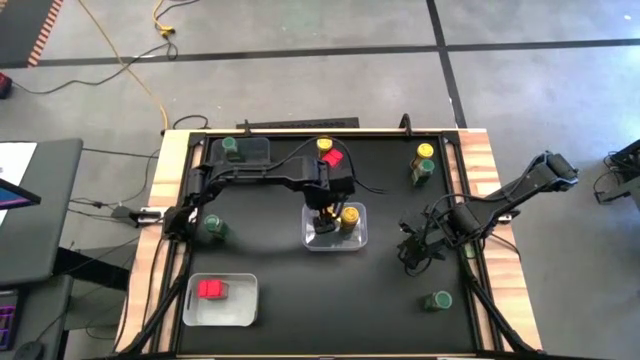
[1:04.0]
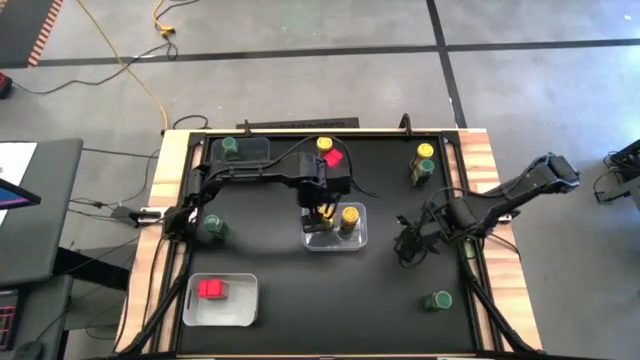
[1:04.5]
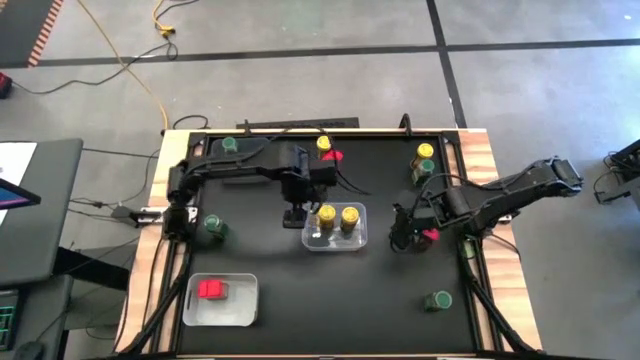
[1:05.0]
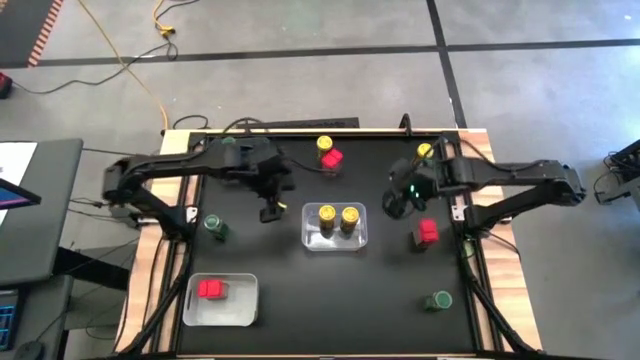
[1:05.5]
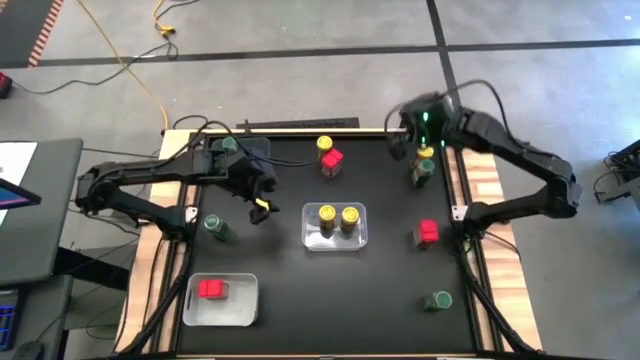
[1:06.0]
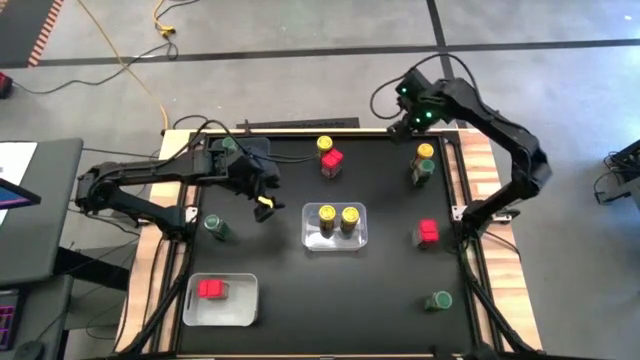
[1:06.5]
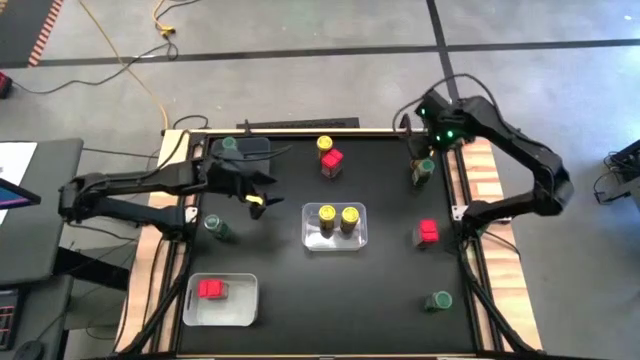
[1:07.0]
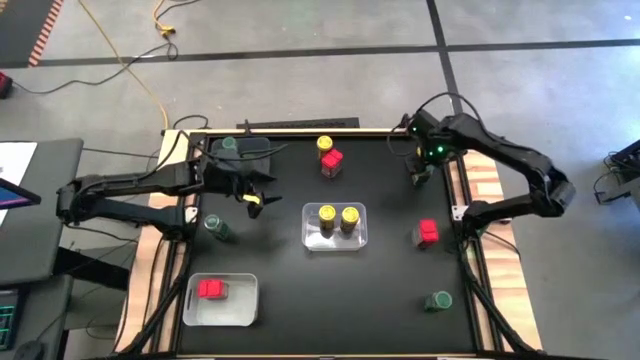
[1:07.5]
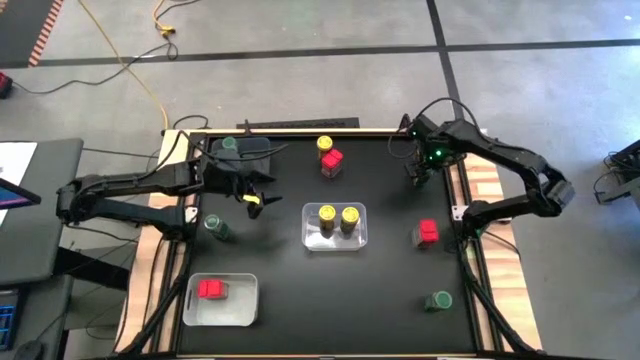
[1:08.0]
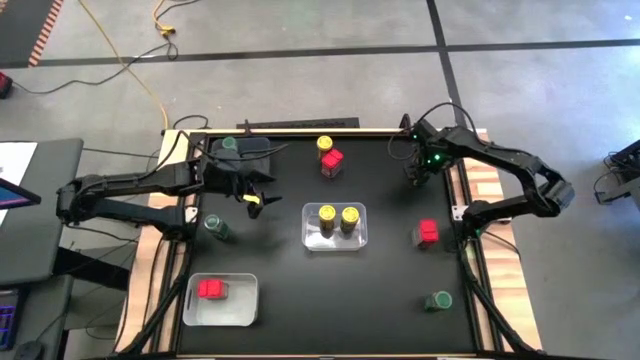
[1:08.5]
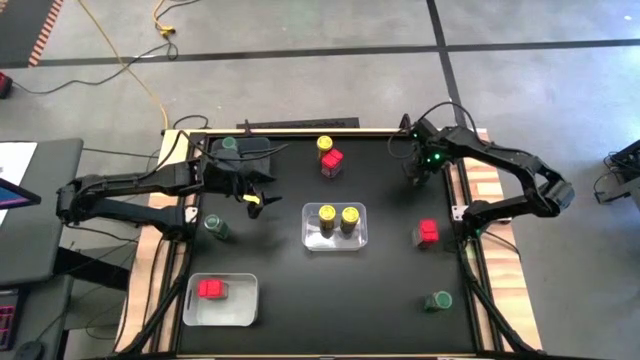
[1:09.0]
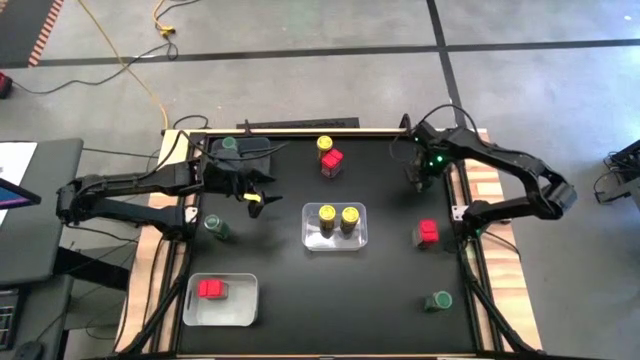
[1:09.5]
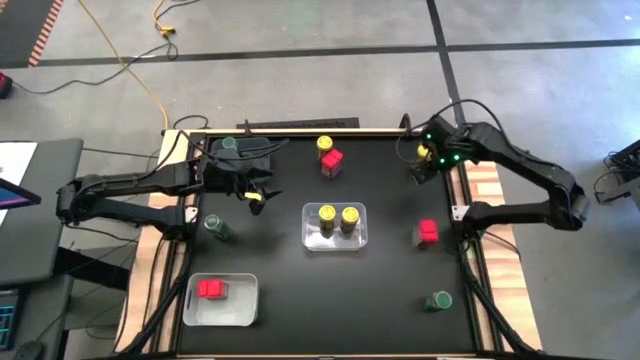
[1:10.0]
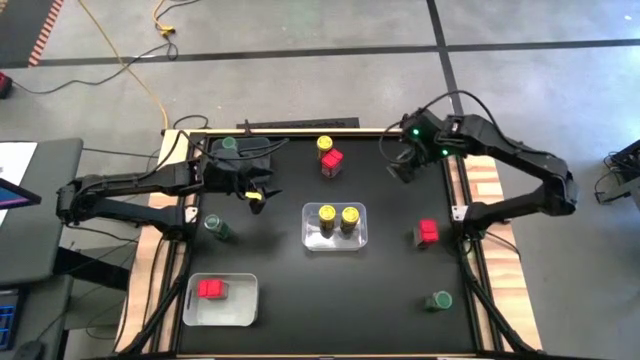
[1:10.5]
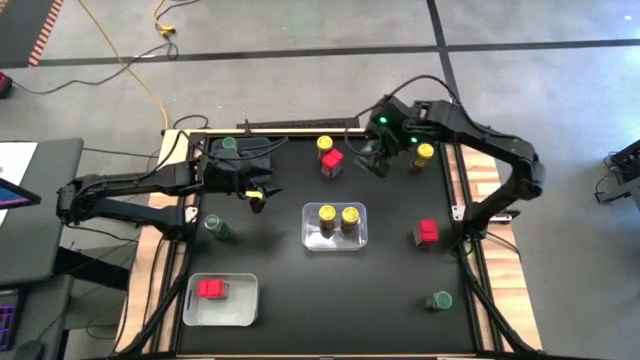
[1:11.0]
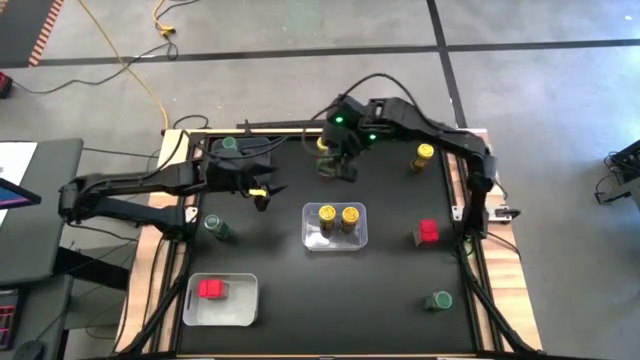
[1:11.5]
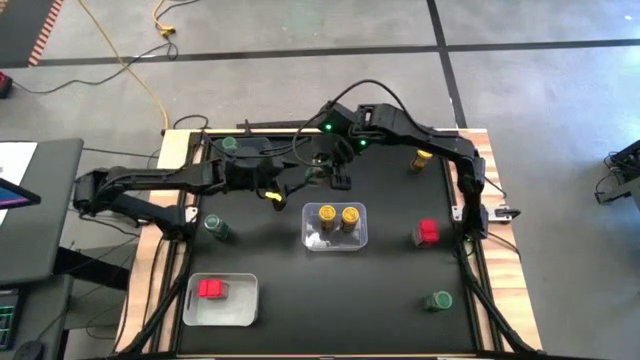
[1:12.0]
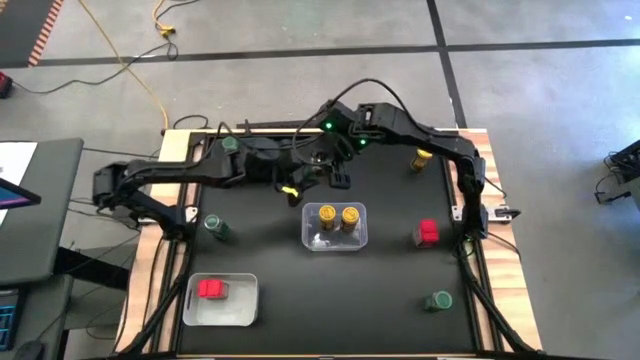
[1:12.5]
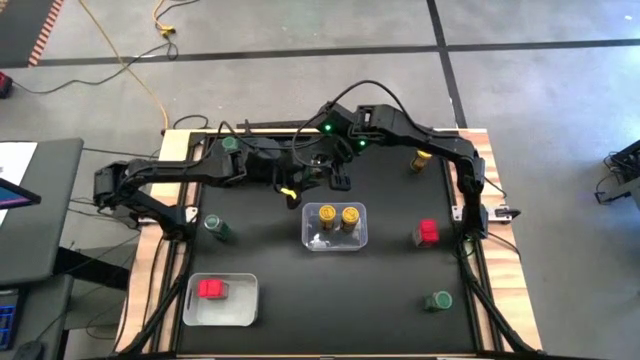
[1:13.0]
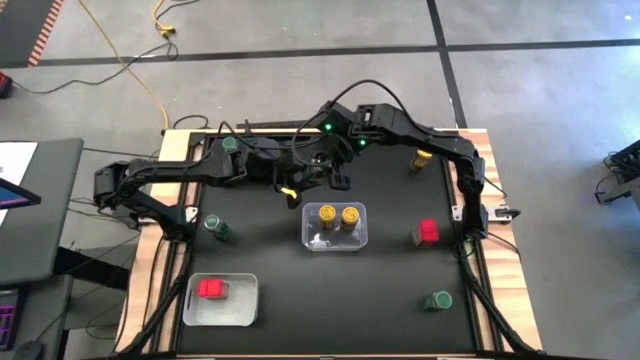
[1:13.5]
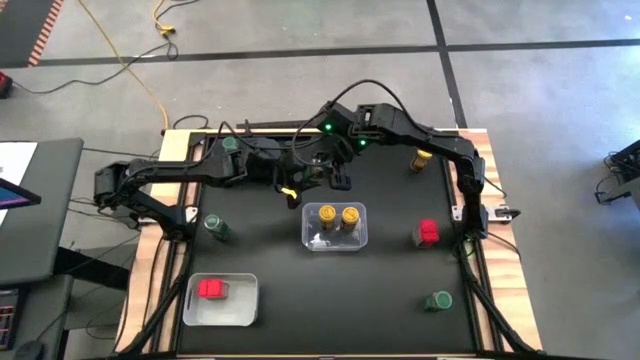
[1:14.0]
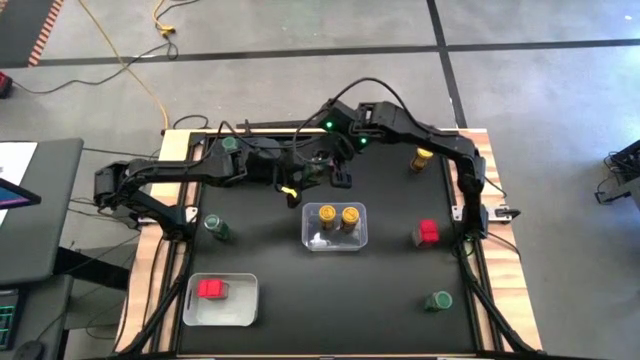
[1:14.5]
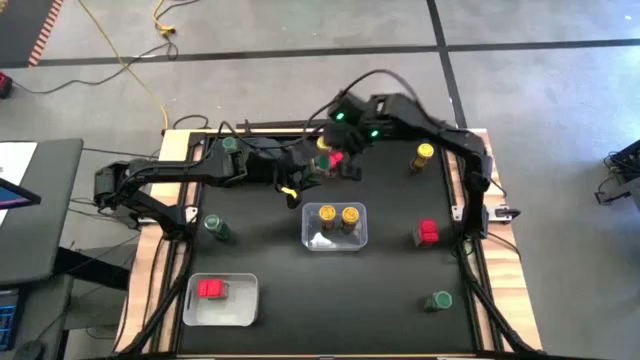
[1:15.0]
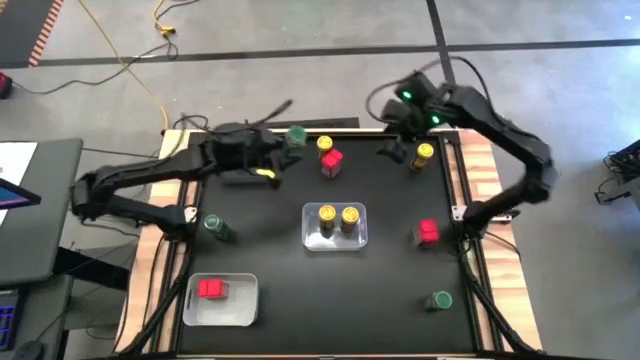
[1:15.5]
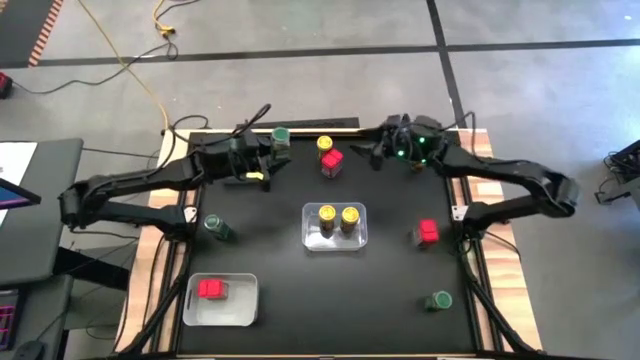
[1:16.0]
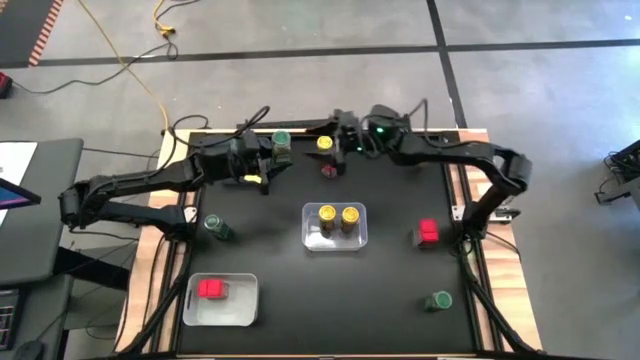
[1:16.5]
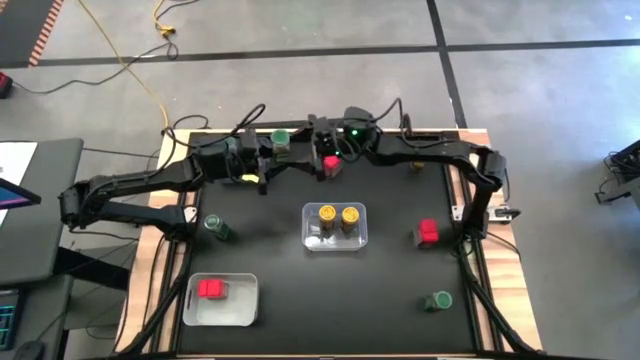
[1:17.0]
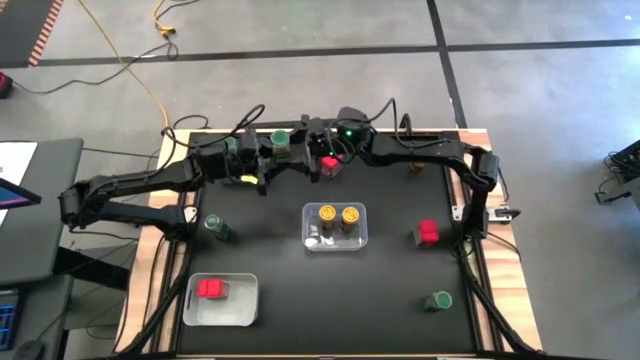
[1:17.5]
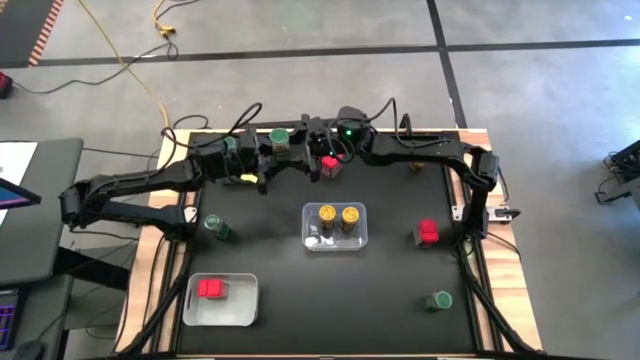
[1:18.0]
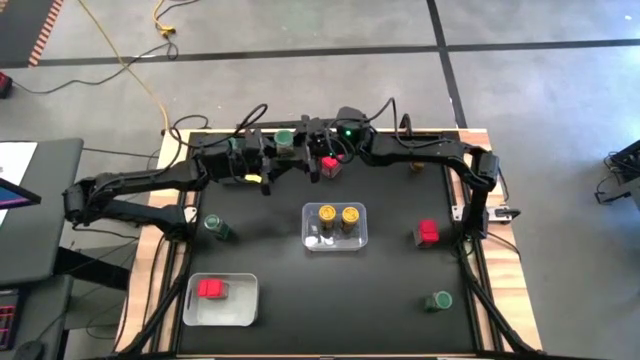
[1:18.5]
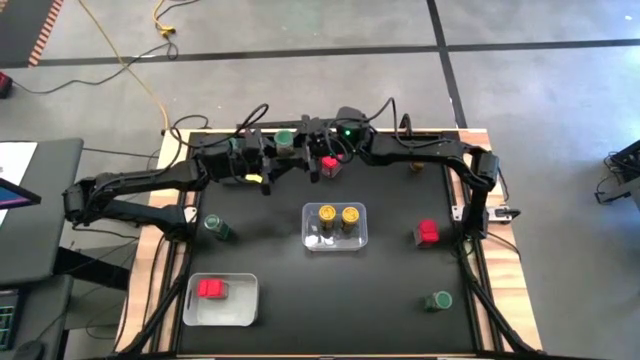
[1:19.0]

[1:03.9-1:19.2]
Task: Sort spices by type
Put the green seasoning bottle into the black bin

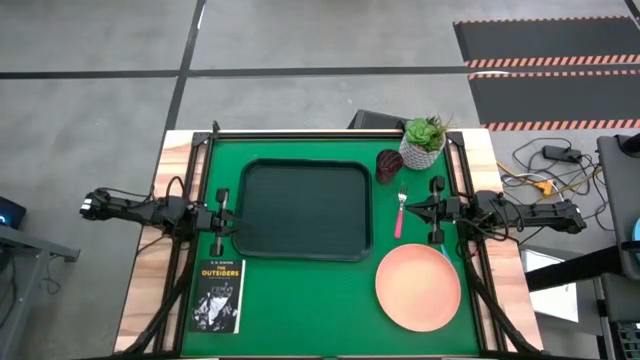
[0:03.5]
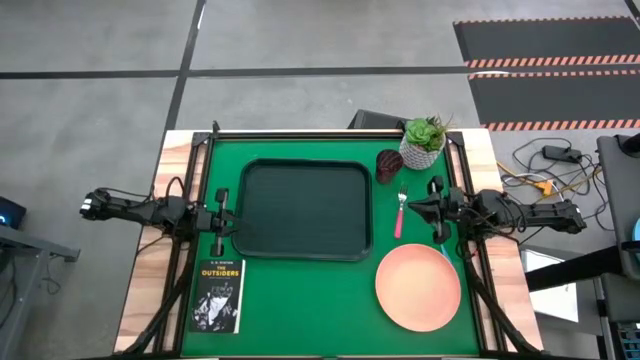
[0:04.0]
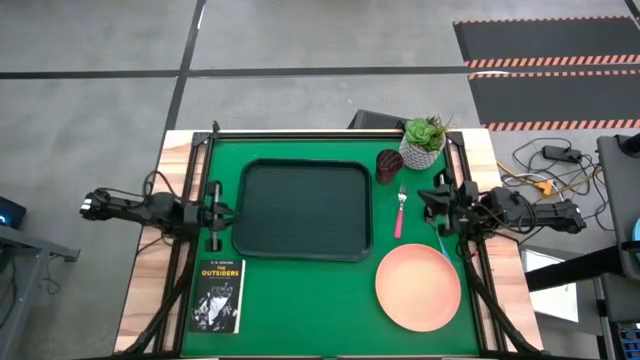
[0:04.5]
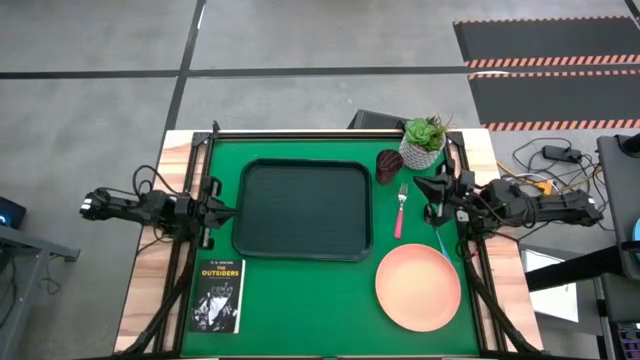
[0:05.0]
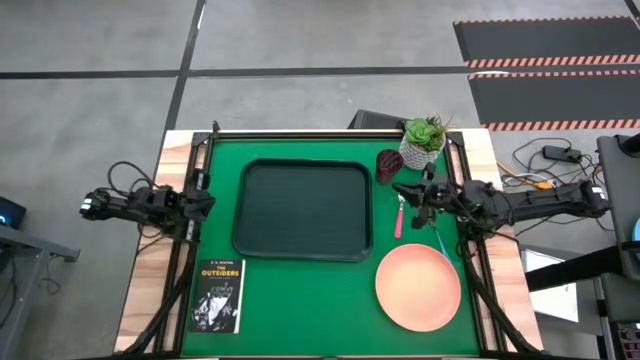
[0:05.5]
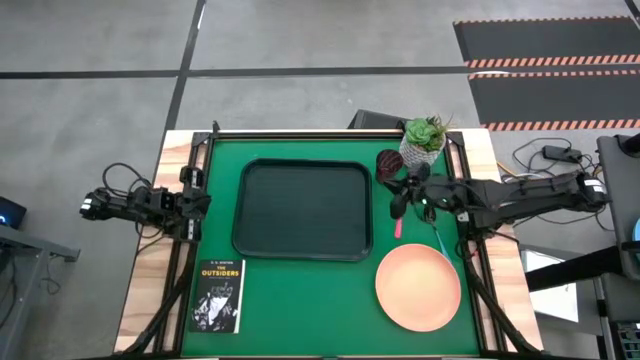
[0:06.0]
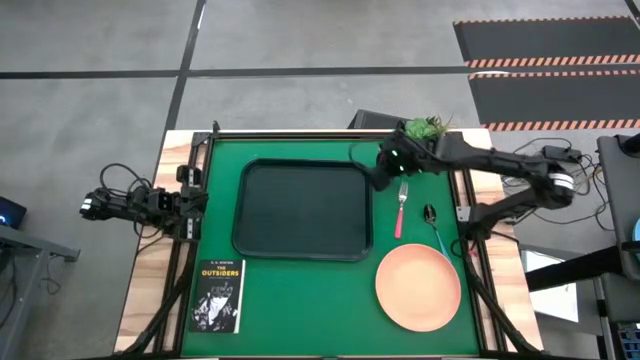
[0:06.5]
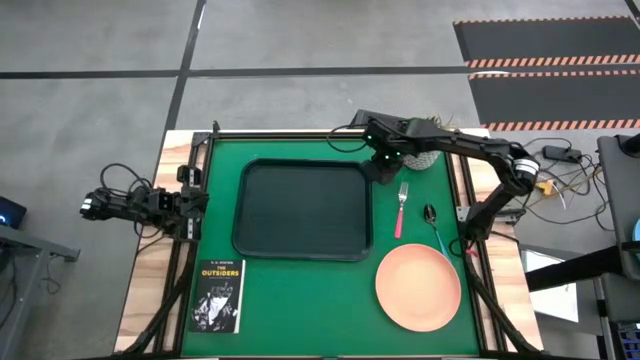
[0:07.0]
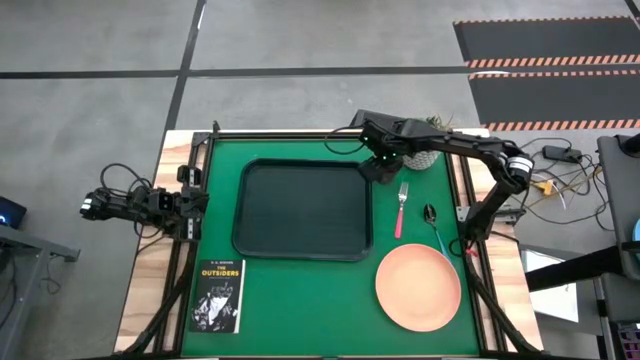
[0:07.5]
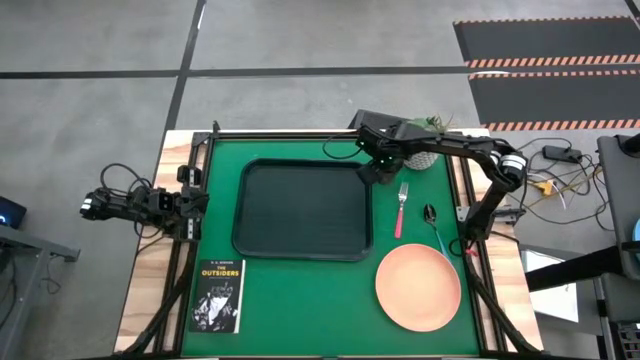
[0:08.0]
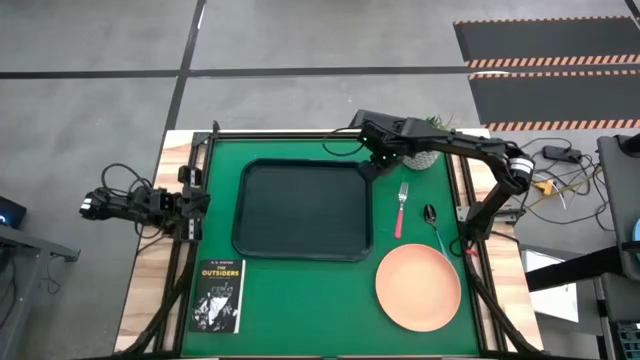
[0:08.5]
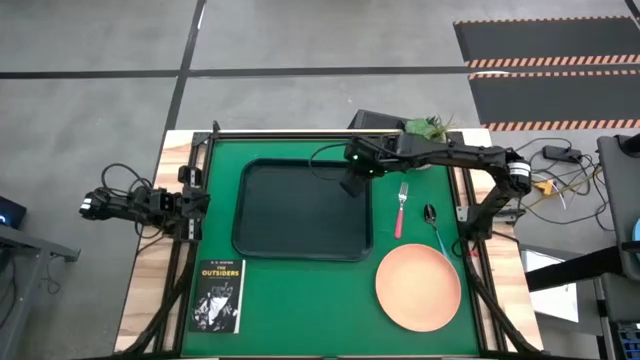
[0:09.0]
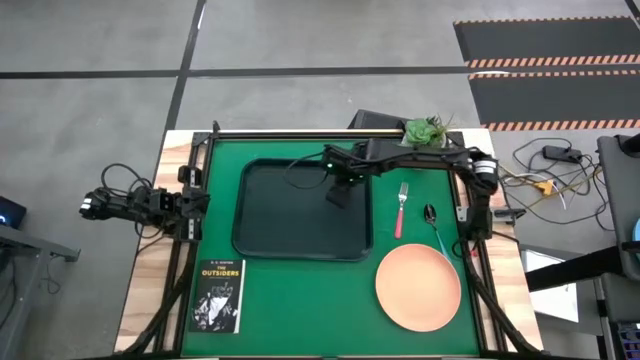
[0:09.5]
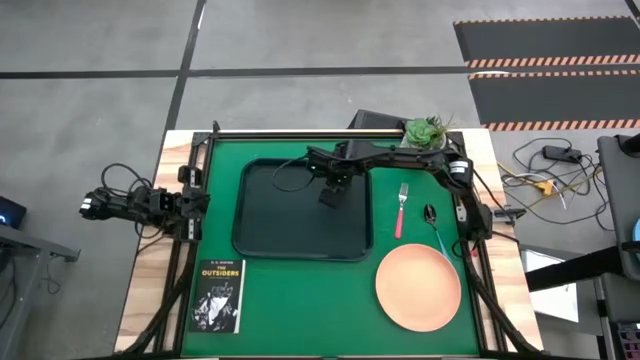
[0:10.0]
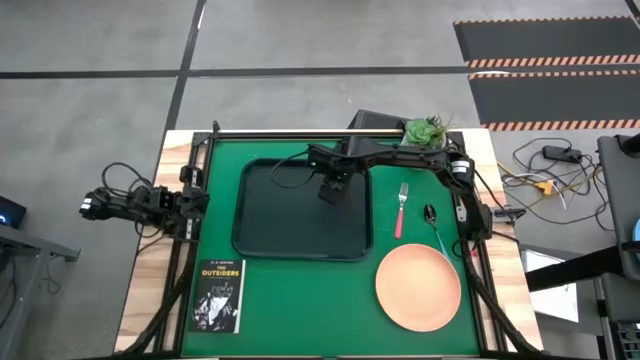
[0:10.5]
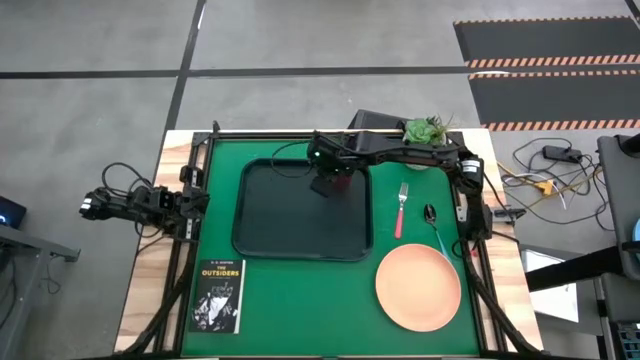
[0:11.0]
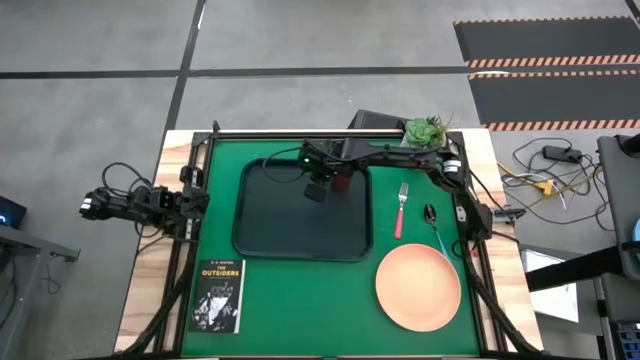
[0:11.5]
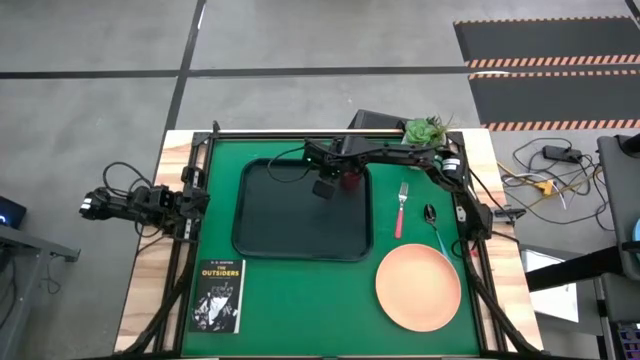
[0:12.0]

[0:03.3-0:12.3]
Task: Pick and place plate/cup/fork/spoon on tray
Put the red cup on the top right of the black tray
